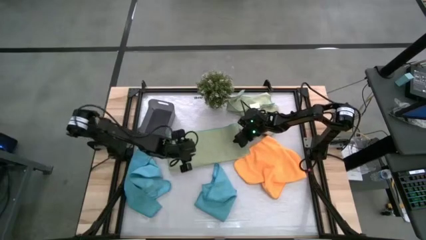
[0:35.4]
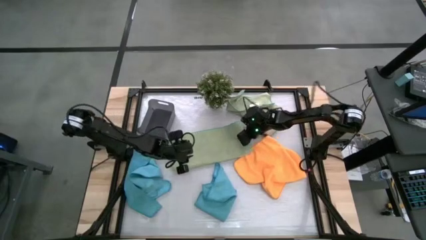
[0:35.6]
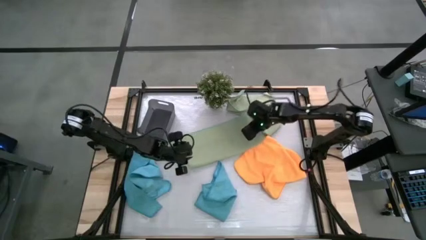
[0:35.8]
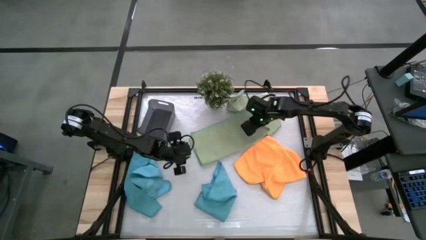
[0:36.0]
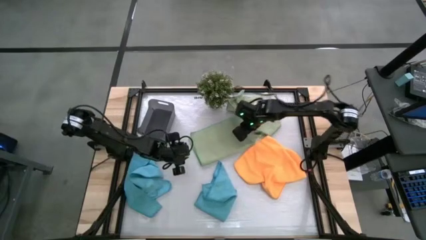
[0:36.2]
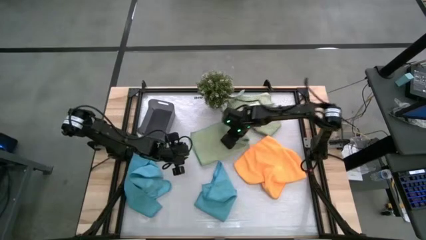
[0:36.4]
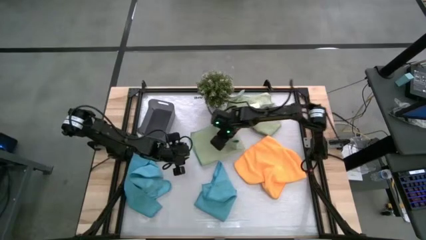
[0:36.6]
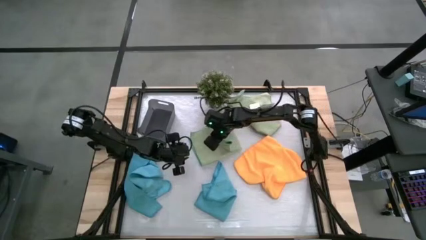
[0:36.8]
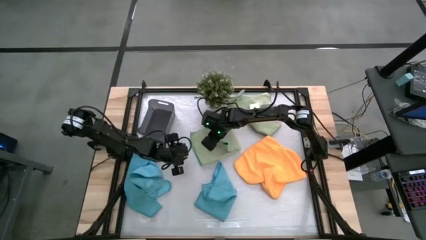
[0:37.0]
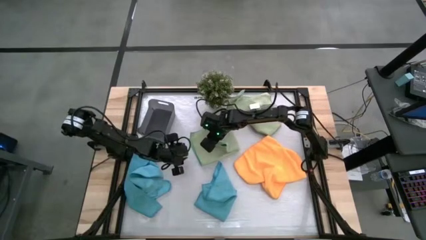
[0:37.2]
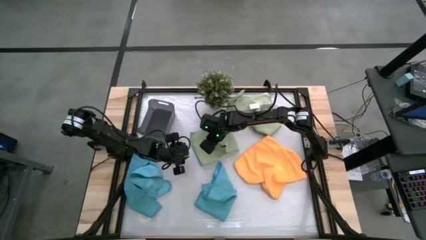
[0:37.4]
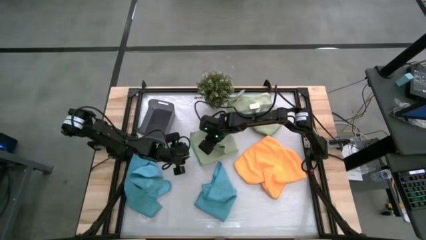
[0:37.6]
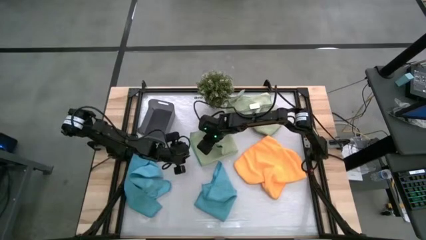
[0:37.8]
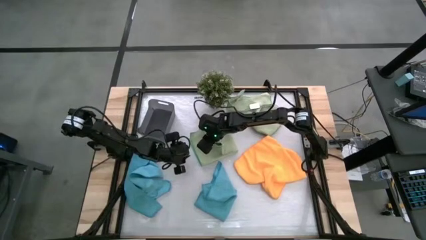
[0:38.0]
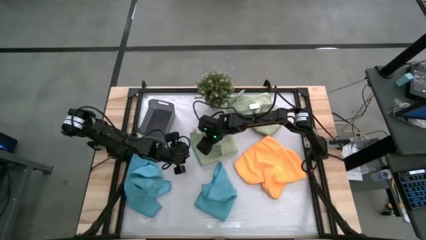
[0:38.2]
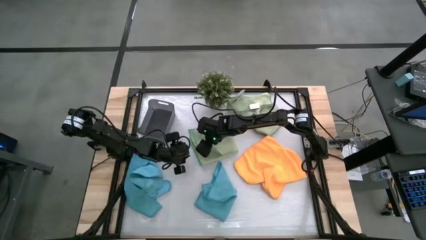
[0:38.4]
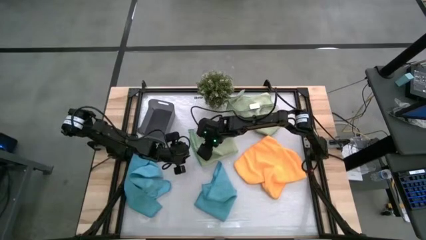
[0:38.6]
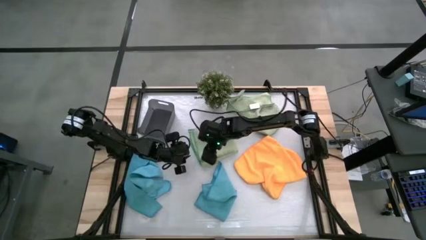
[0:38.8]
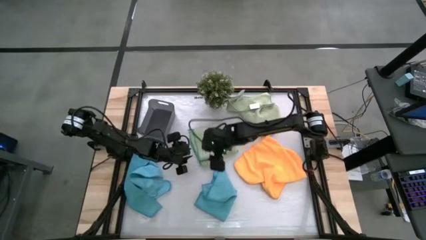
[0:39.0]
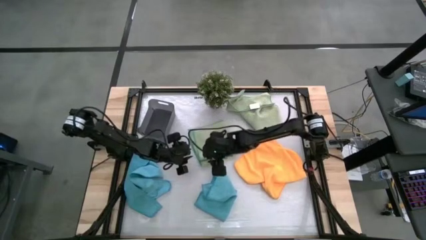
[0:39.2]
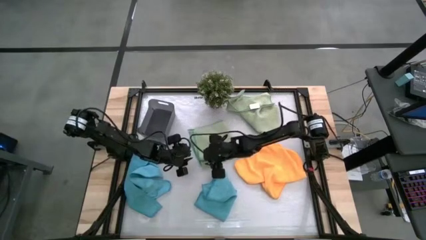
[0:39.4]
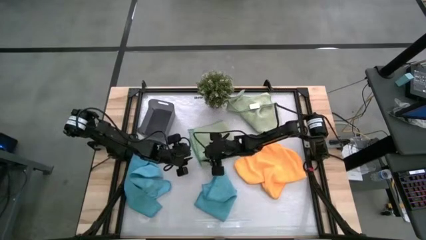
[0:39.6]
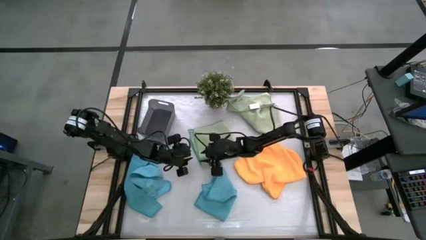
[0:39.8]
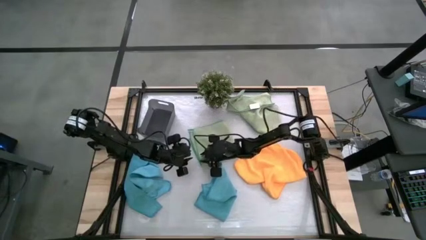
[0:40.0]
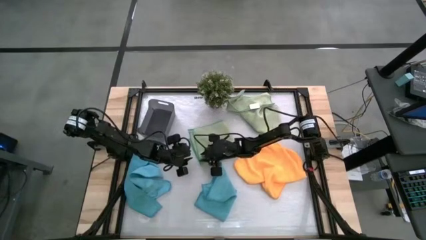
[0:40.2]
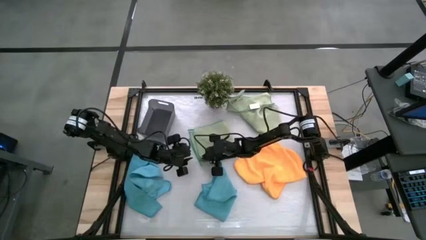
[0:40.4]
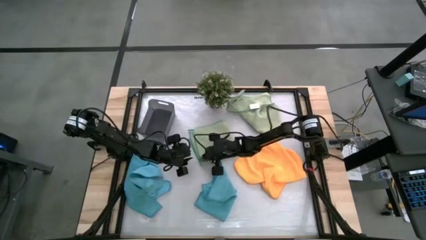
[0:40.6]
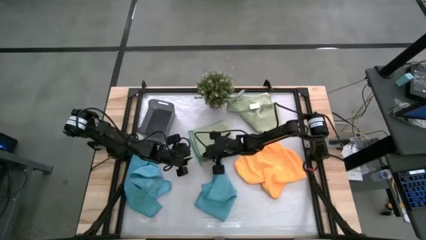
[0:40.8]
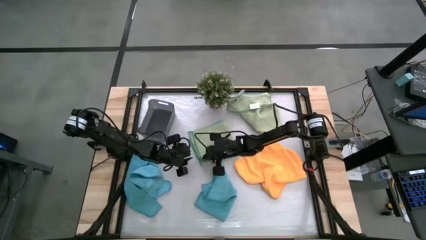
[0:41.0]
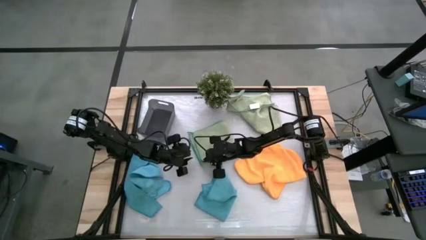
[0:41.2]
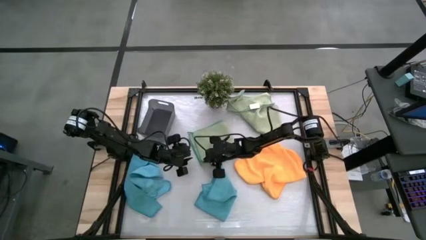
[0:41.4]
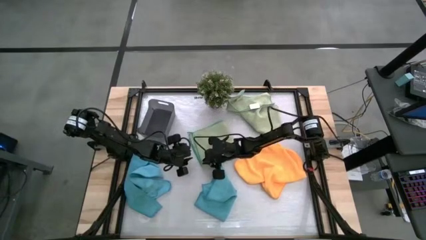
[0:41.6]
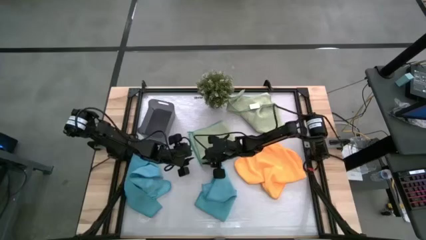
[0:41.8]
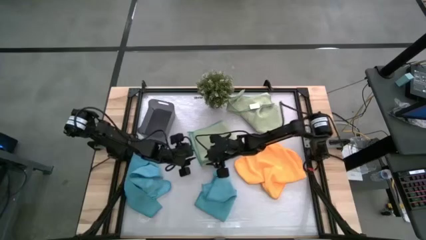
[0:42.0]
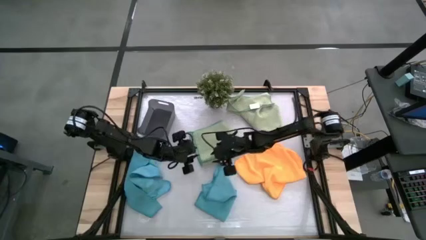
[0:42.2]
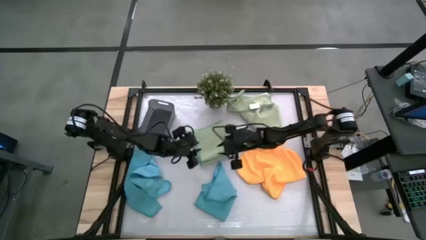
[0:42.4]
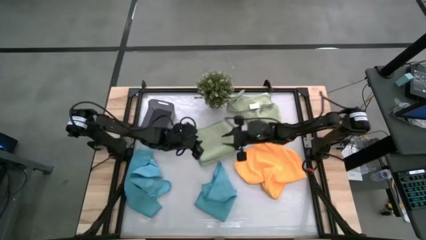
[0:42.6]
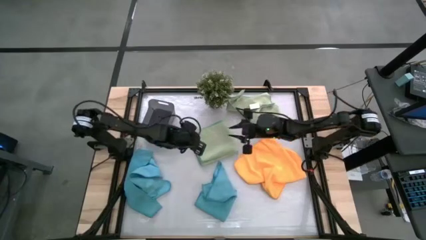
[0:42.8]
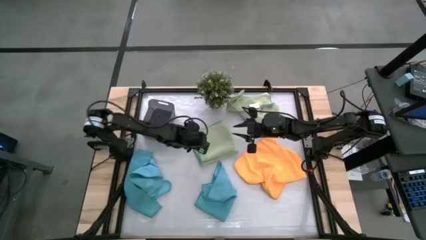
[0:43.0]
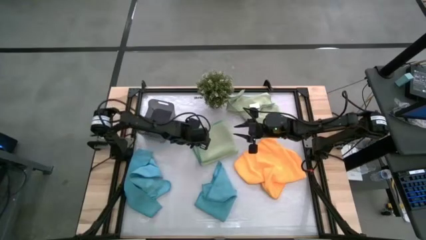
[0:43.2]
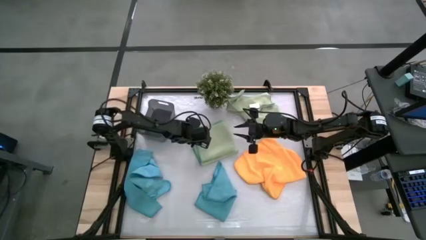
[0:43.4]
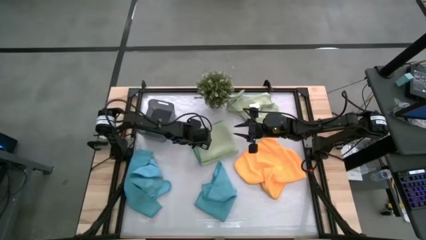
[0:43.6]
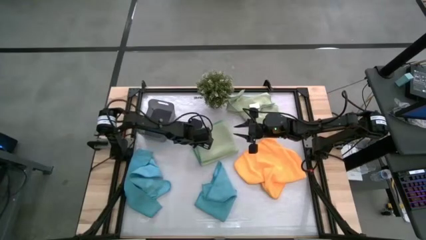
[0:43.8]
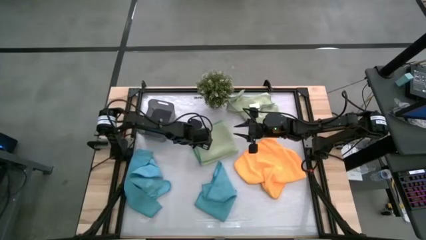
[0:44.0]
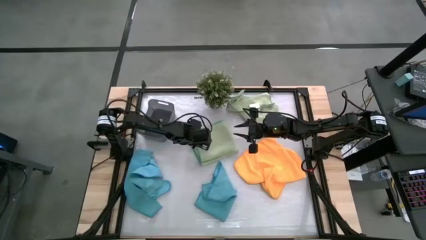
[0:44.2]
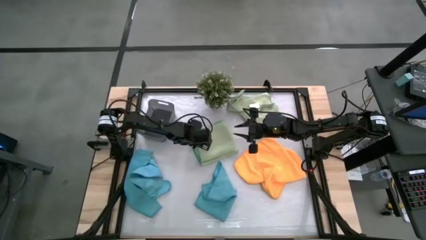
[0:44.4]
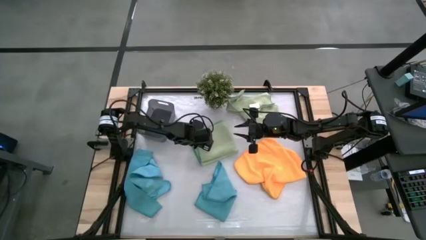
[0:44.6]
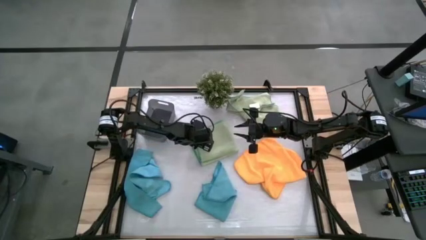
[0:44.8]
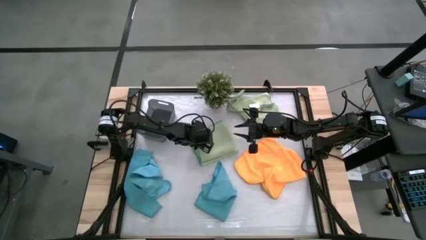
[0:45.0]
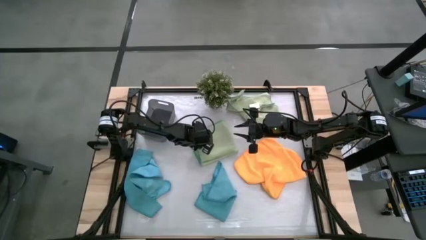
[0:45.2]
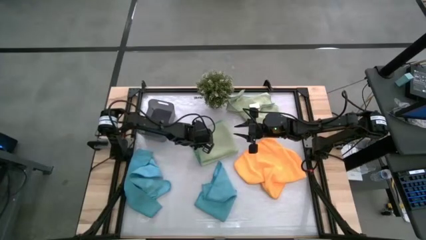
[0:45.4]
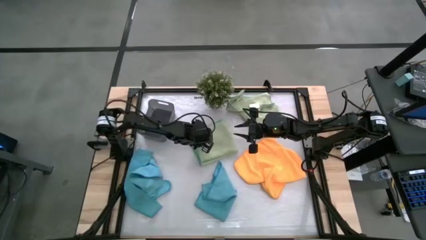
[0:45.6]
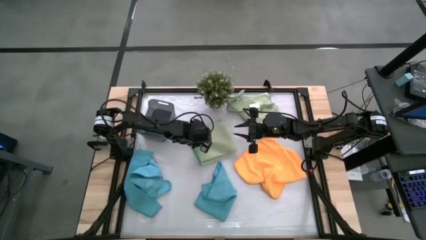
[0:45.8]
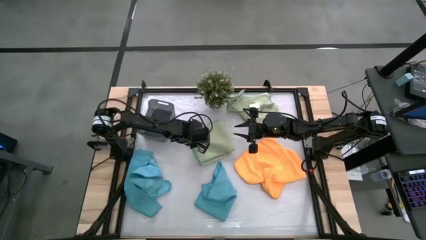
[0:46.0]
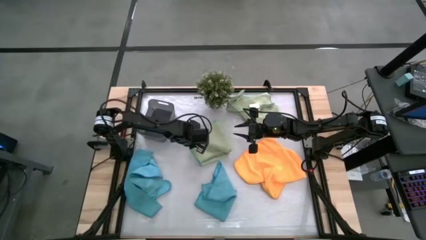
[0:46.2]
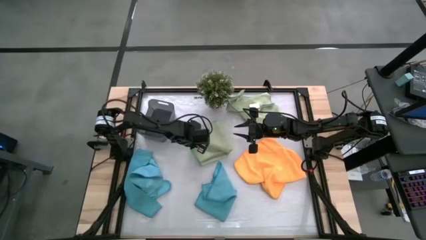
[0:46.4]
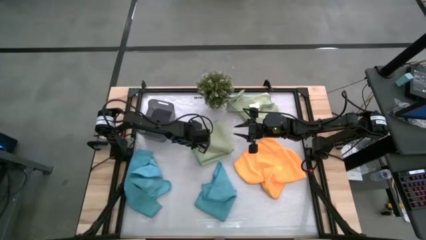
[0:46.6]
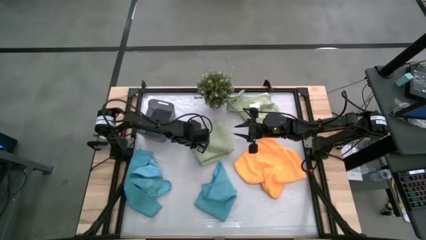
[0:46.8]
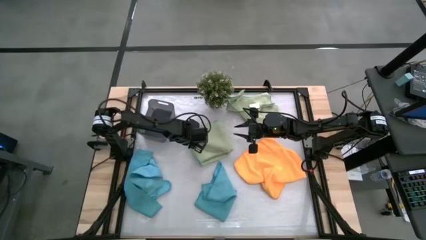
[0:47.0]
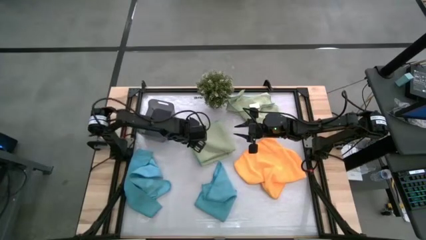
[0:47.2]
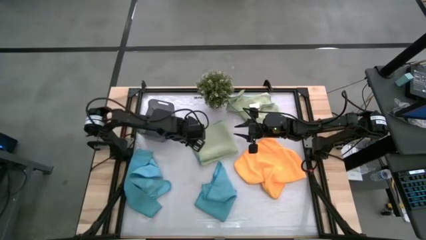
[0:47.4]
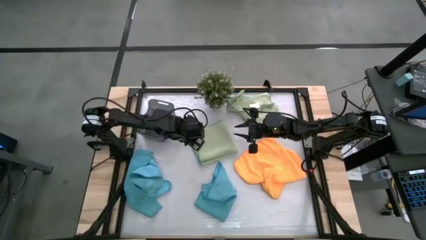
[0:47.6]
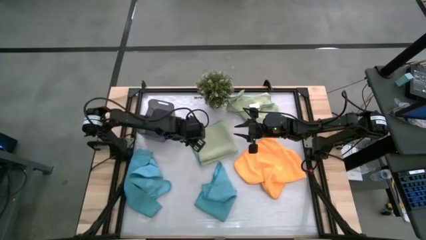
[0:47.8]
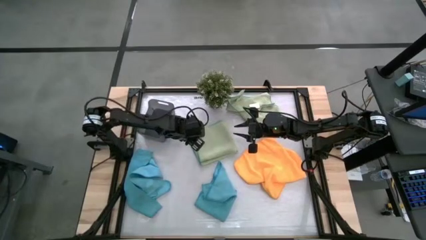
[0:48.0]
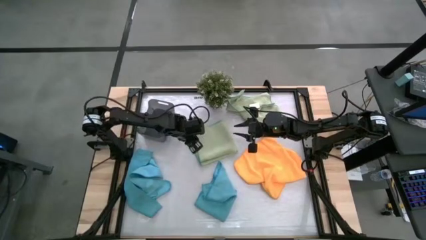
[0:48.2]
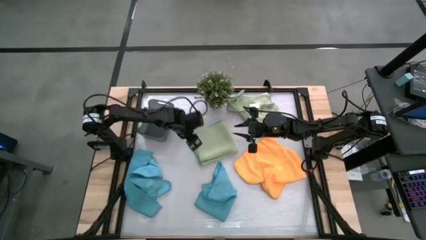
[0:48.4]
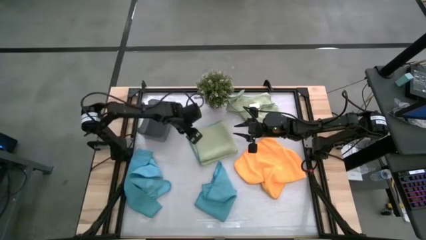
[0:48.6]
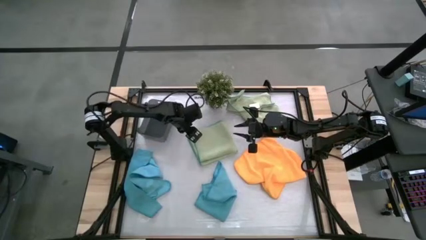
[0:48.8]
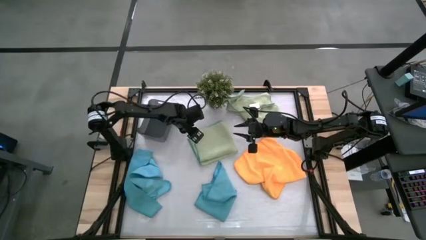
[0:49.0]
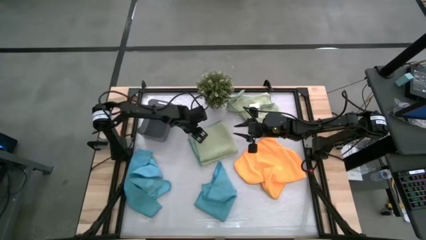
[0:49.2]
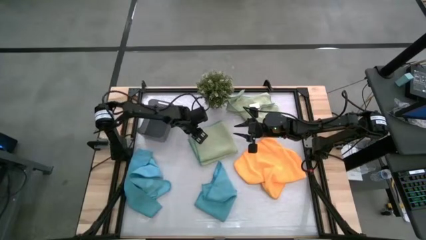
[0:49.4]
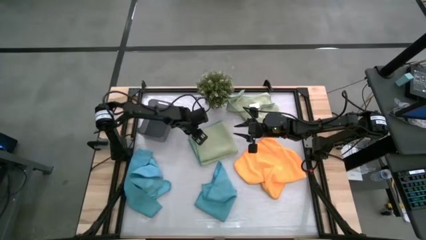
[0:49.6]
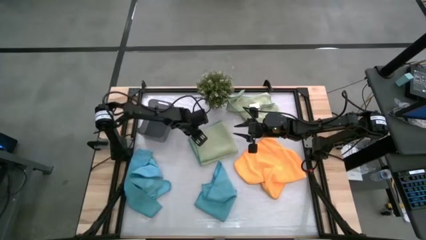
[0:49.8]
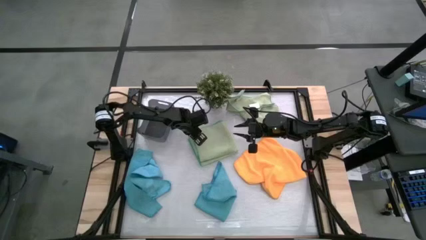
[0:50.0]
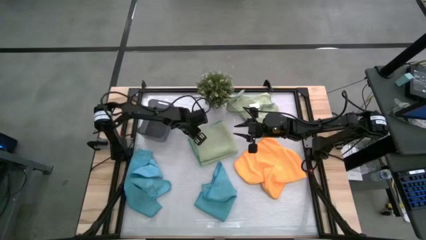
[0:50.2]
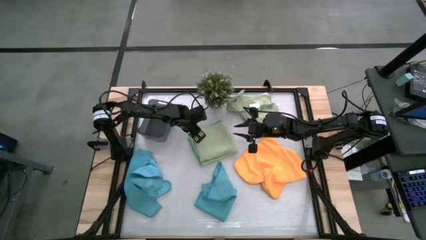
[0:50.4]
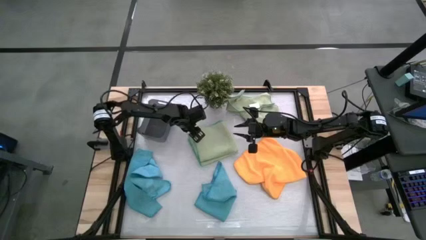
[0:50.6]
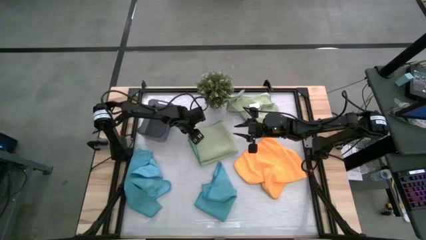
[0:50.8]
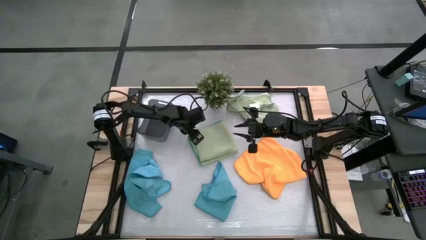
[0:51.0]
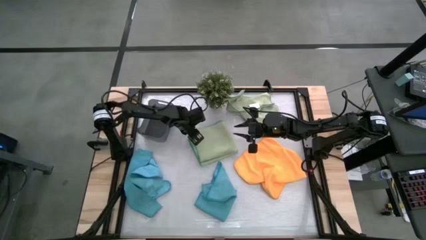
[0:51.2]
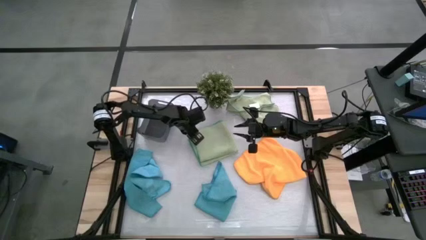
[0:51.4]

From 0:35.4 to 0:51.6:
Task: Fold microfiber towels
Fold the left green microfiber cloth
